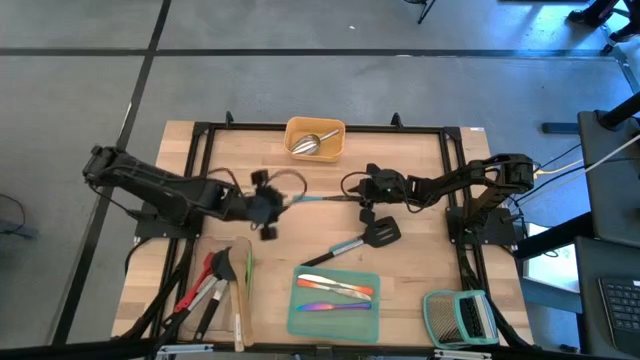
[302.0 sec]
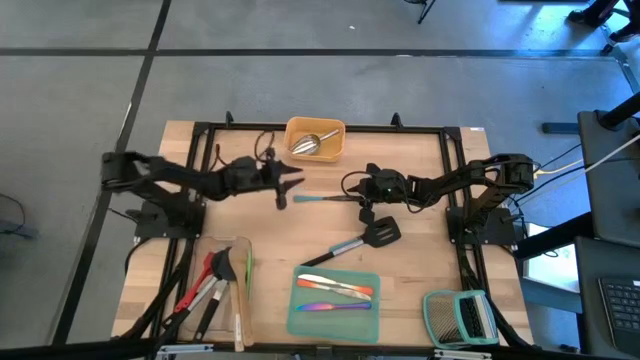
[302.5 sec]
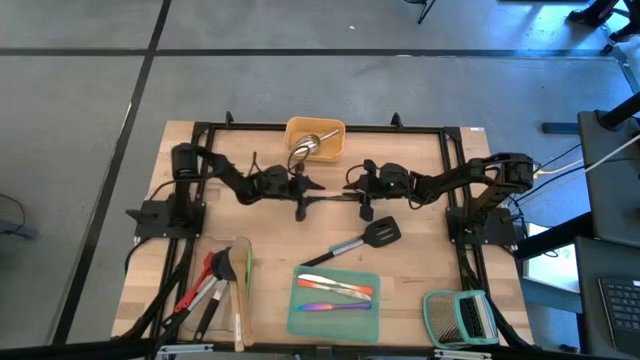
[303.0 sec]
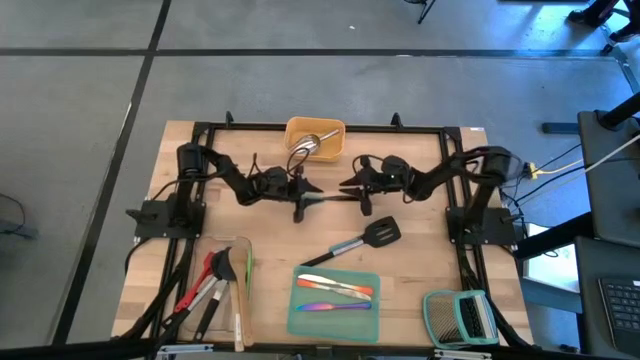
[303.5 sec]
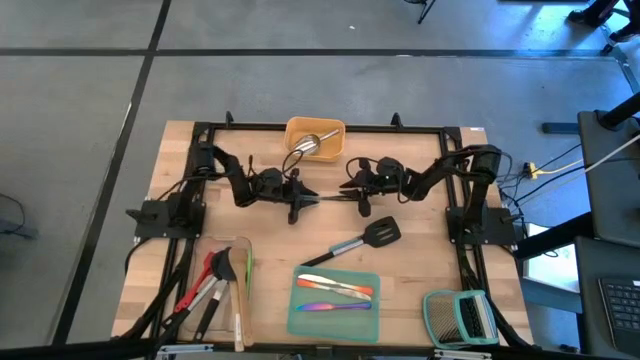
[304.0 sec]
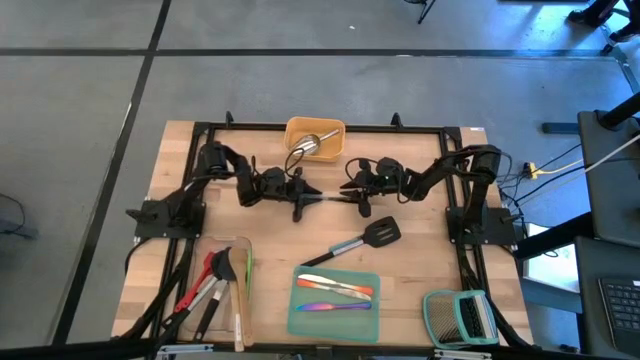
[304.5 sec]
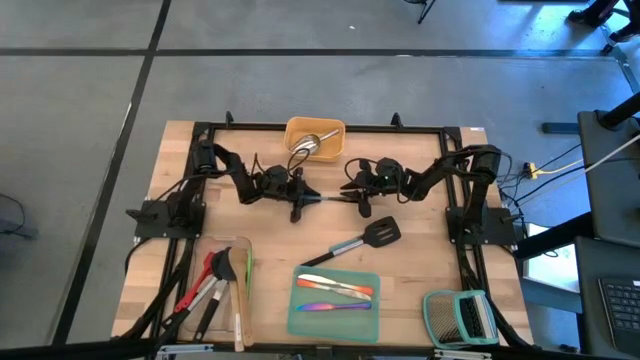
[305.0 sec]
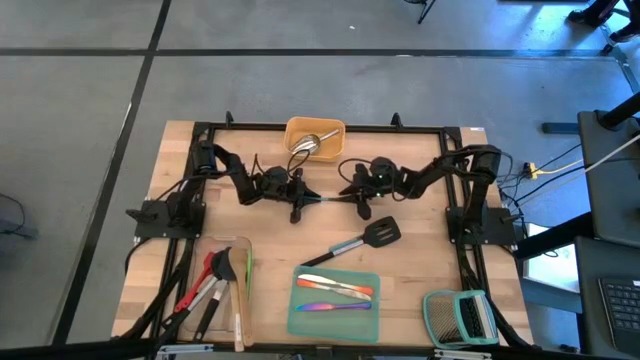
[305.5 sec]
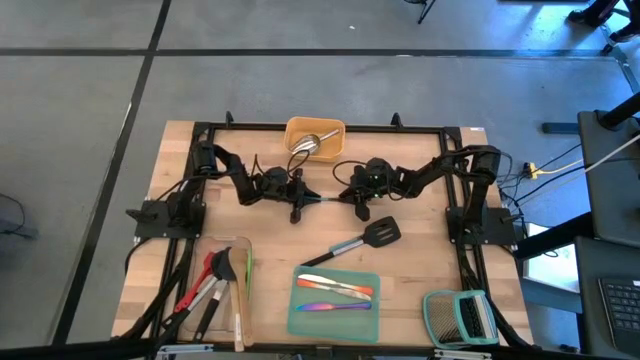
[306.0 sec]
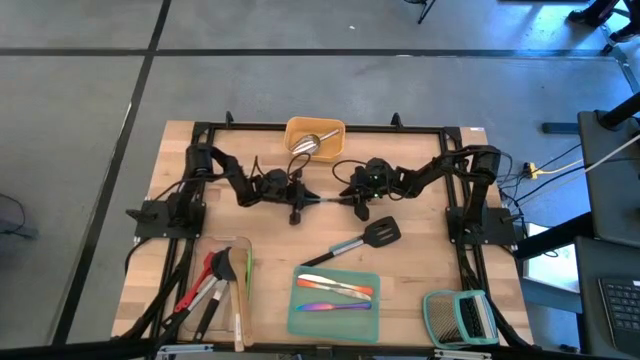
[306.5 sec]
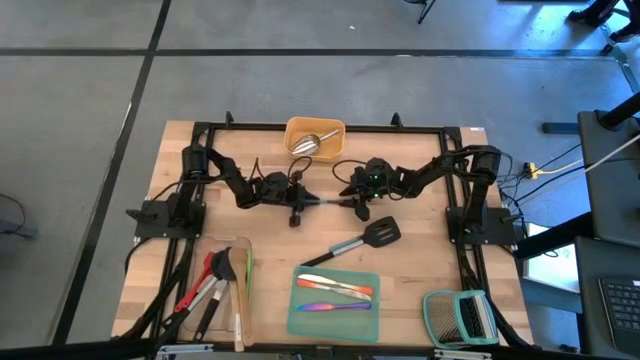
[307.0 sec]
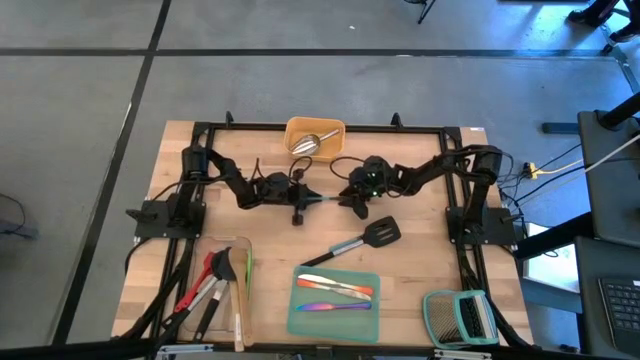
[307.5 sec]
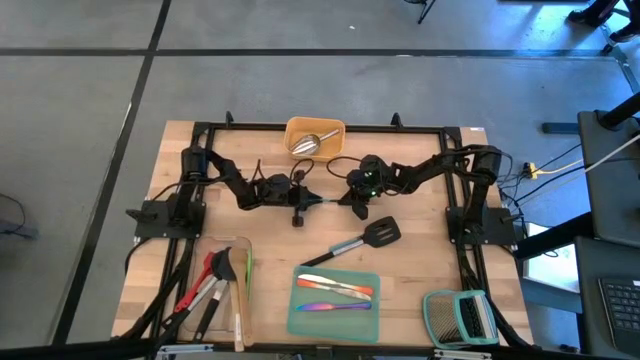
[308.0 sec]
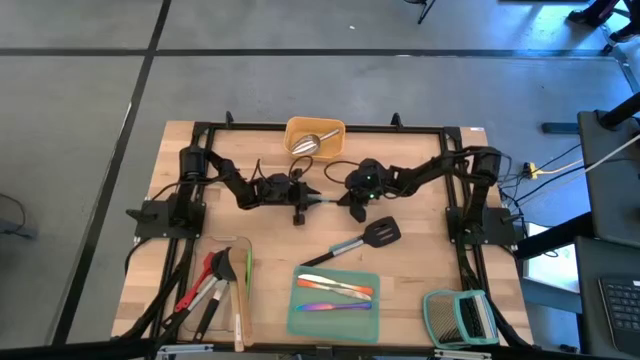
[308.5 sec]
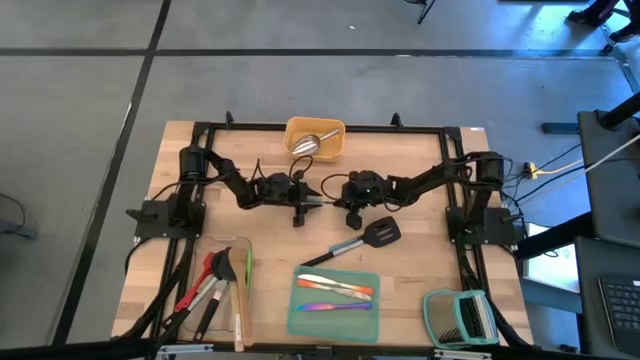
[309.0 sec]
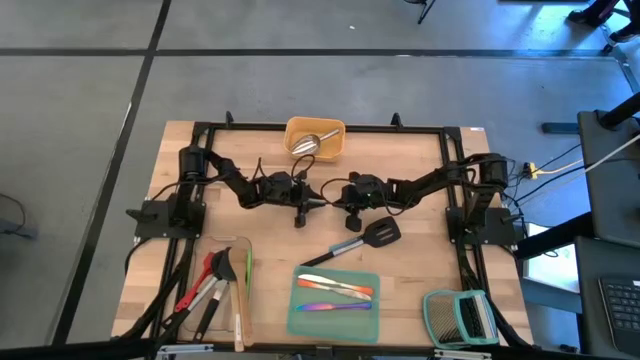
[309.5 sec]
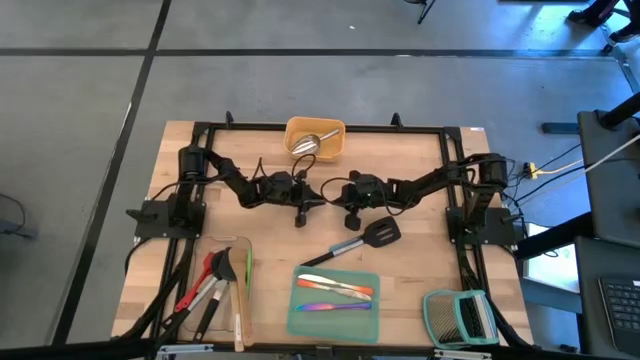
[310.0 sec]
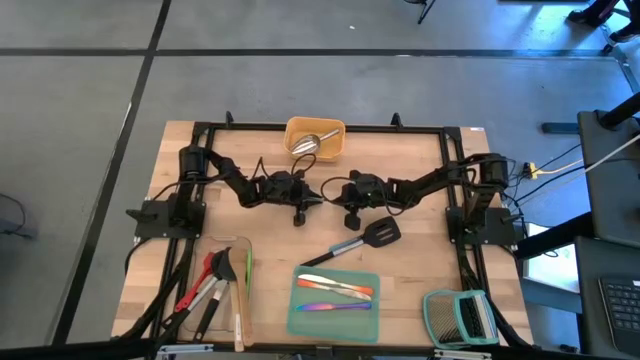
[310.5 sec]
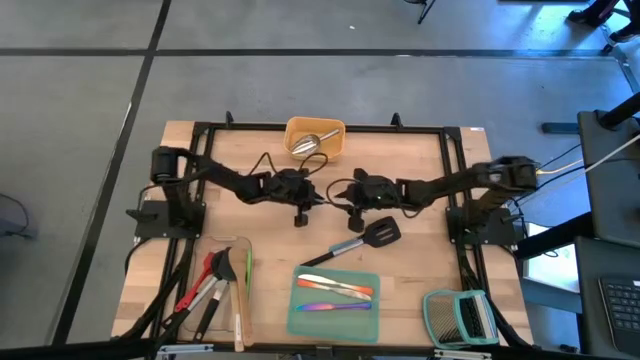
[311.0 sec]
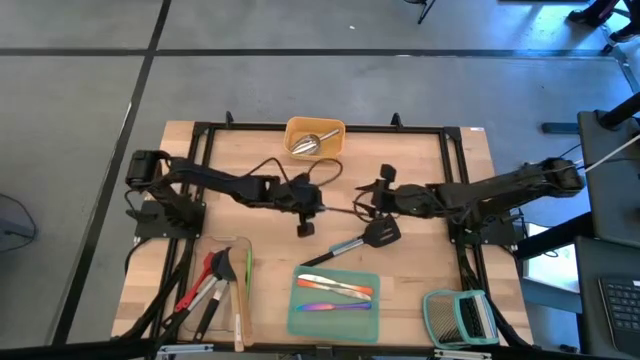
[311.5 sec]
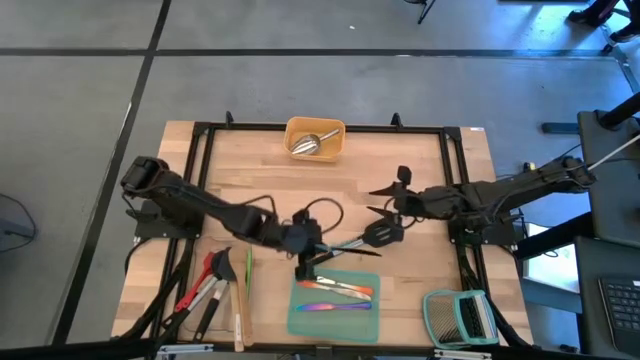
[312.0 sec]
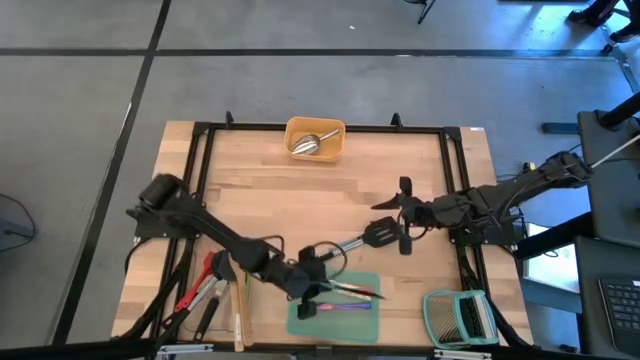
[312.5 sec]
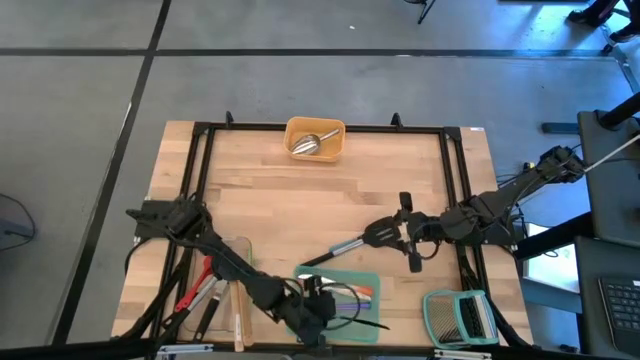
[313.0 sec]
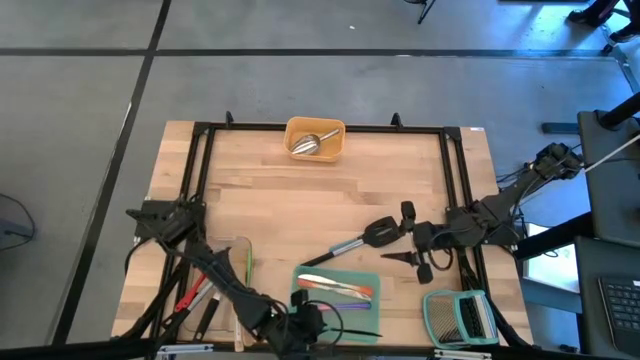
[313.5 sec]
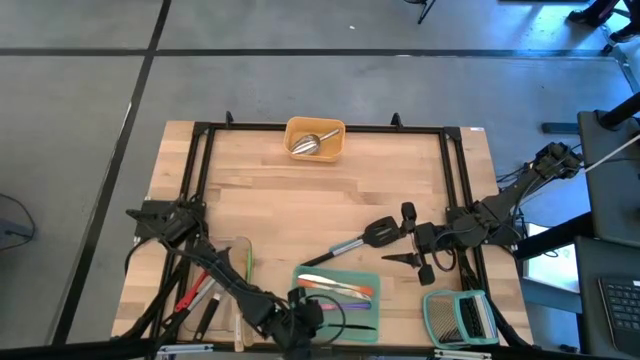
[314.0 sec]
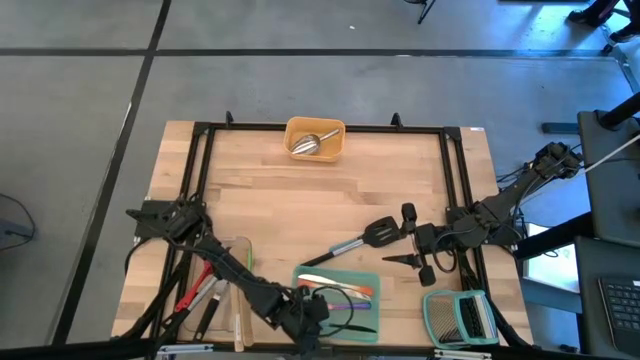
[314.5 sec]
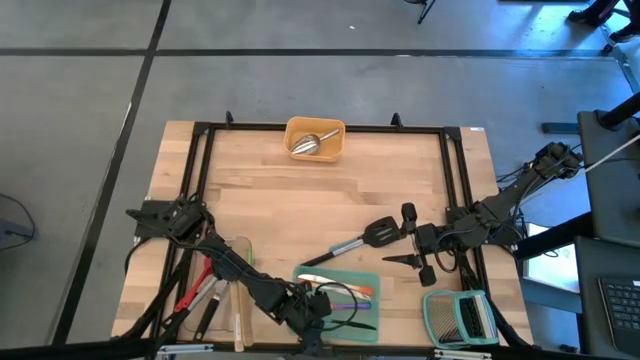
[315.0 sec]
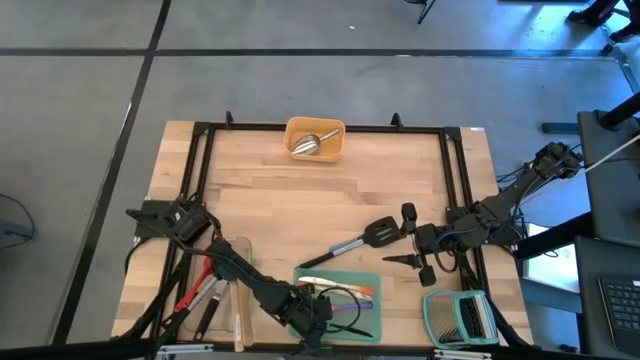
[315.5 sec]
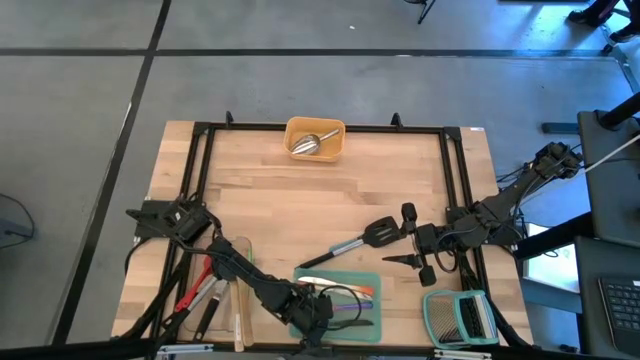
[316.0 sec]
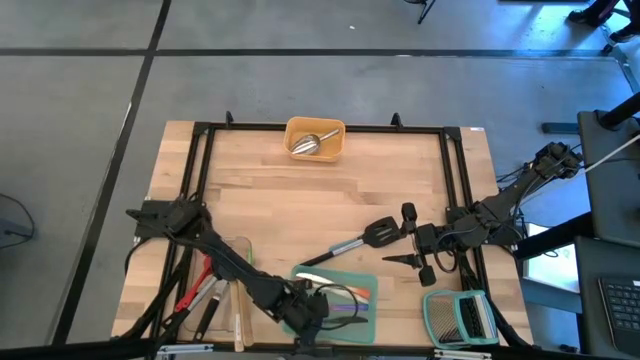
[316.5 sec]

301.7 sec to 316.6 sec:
Task: Pick & Place Kitchen Items
Put the blue table knife into the green bin

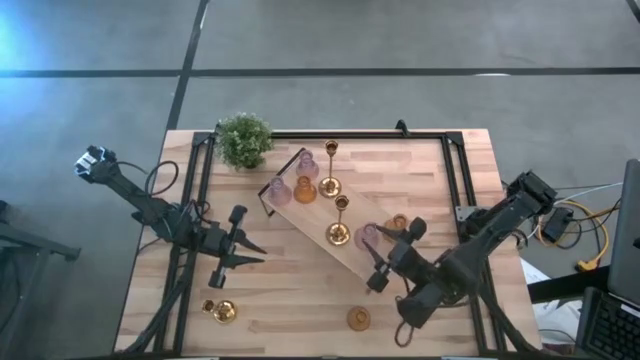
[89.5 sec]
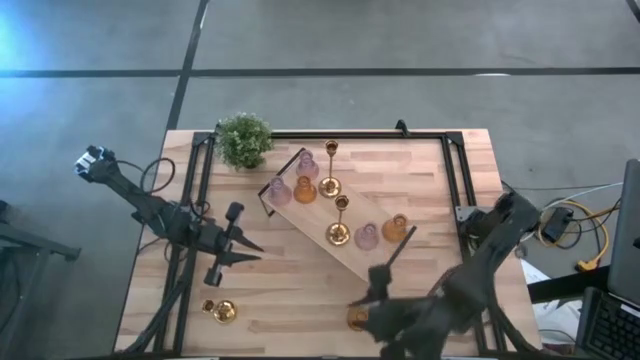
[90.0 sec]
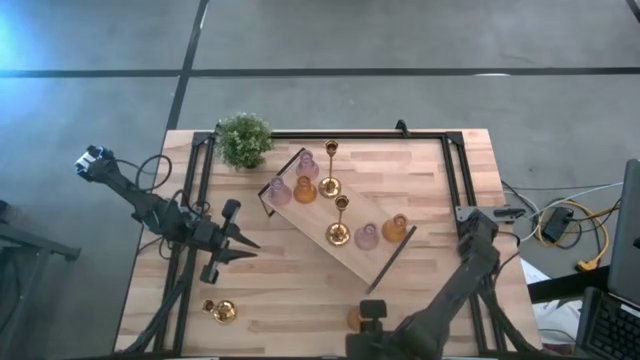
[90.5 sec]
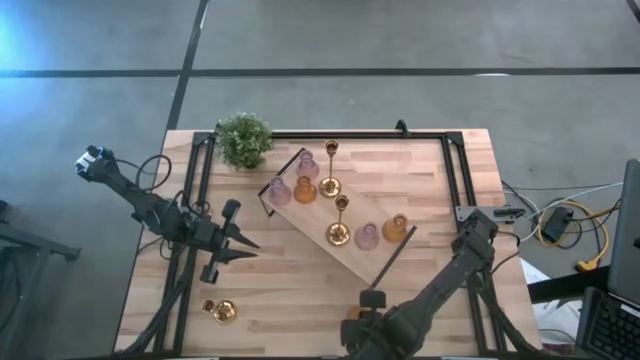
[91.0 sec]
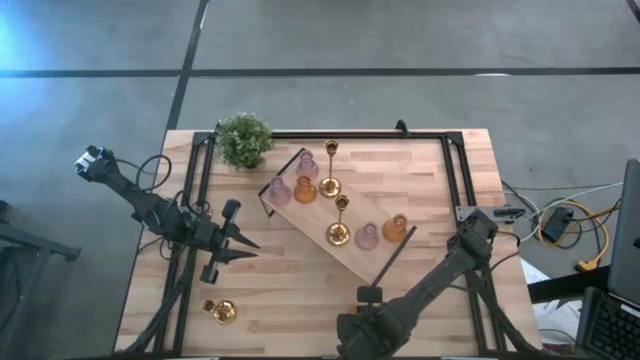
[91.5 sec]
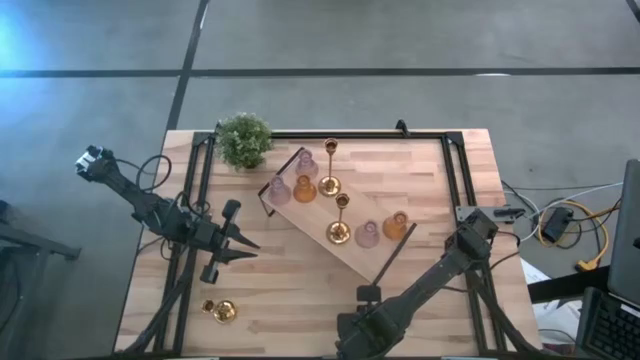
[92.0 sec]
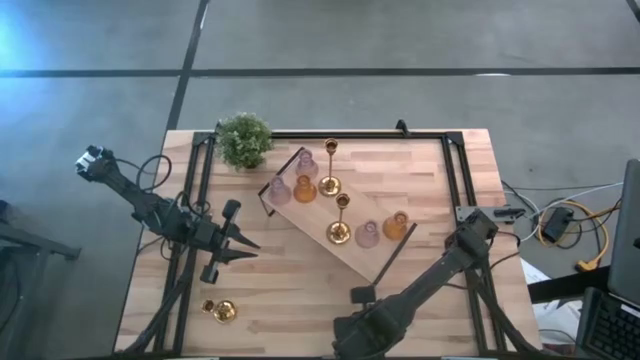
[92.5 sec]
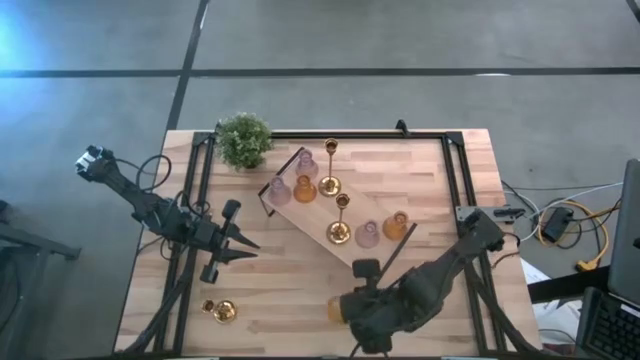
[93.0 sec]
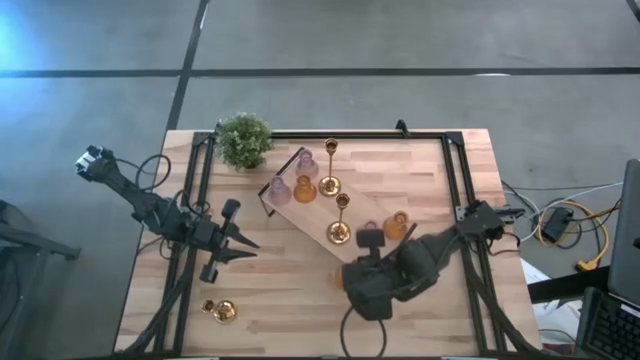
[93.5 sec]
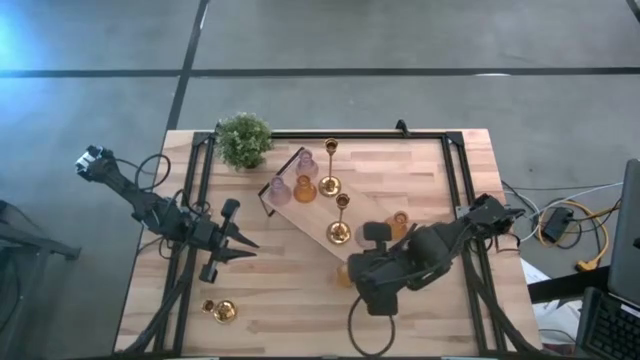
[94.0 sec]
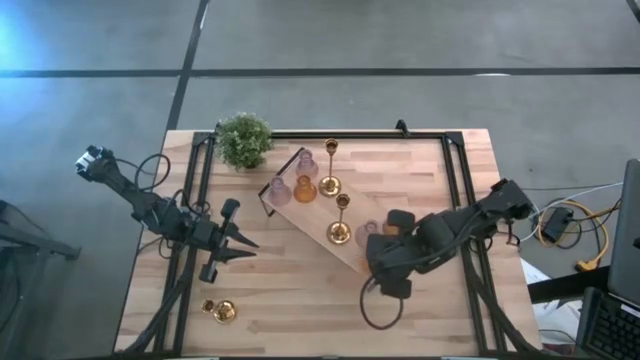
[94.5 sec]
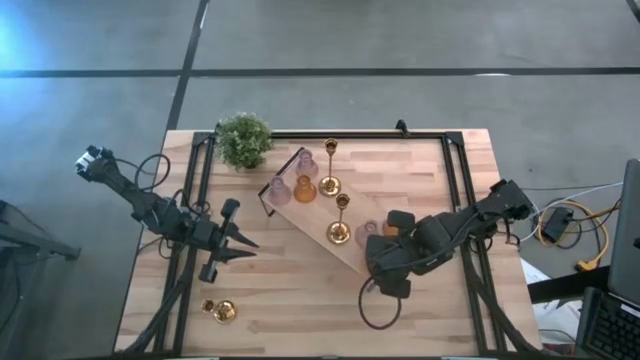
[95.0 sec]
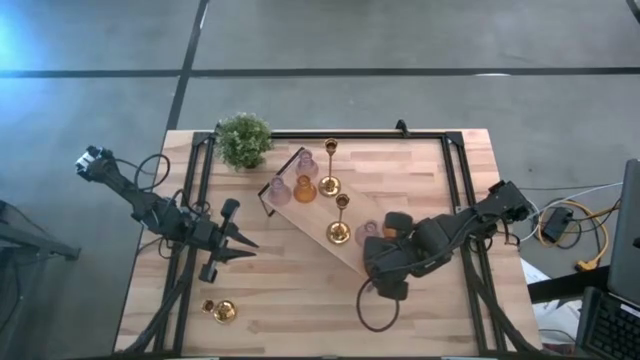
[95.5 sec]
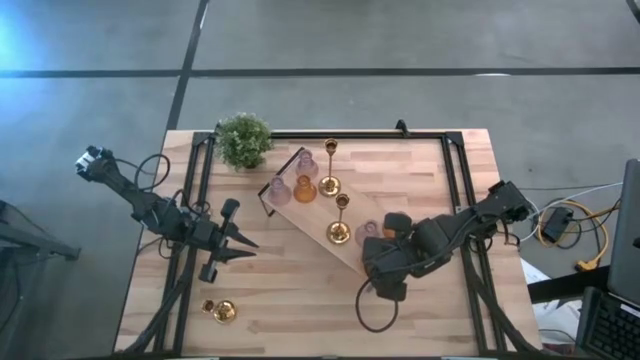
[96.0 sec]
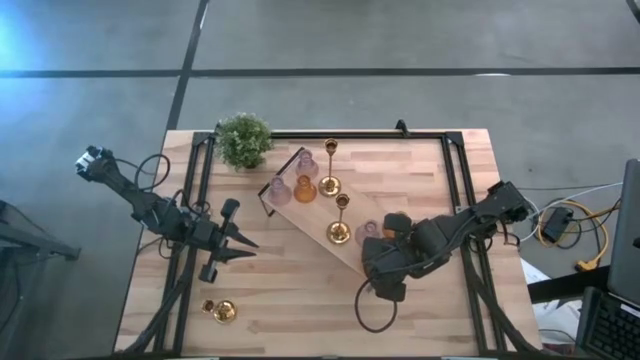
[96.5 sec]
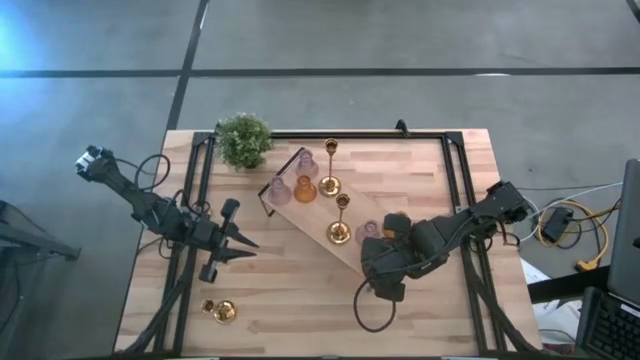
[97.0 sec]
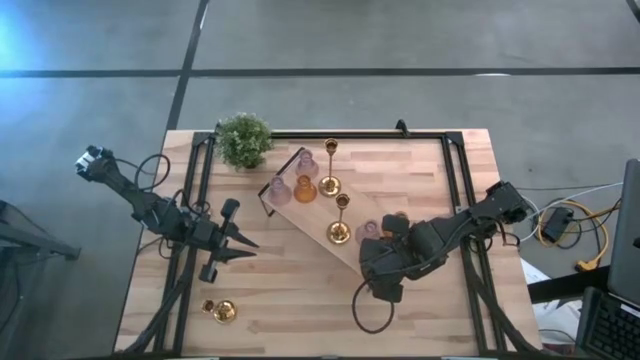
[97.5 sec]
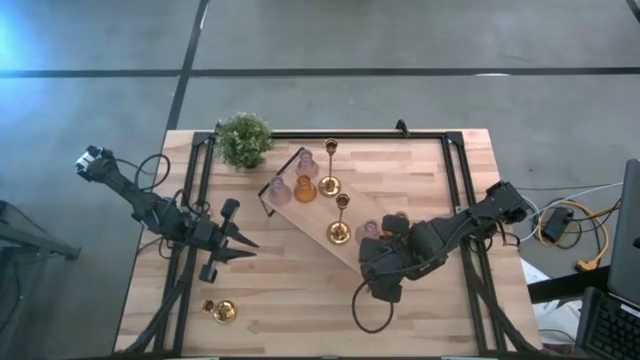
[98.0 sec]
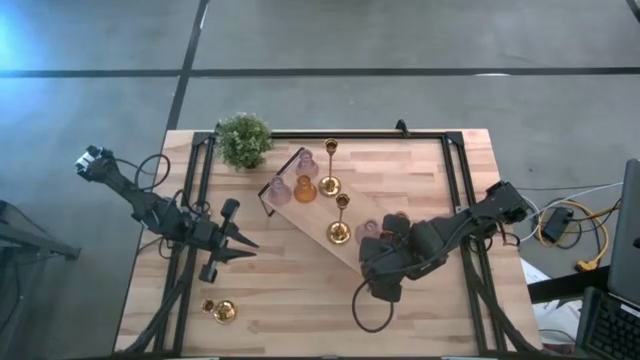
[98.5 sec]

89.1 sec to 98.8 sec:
Task: Pick & Place candle stick holders
Put the yellow candle holder on the shelf
